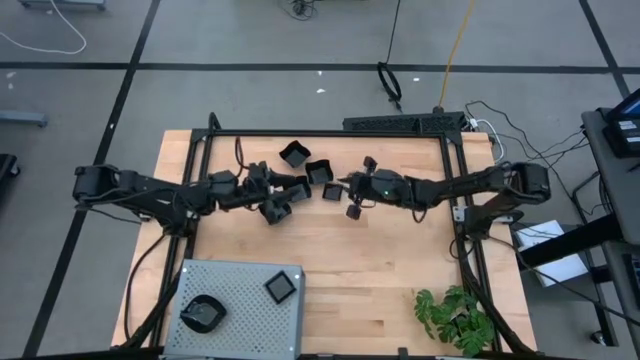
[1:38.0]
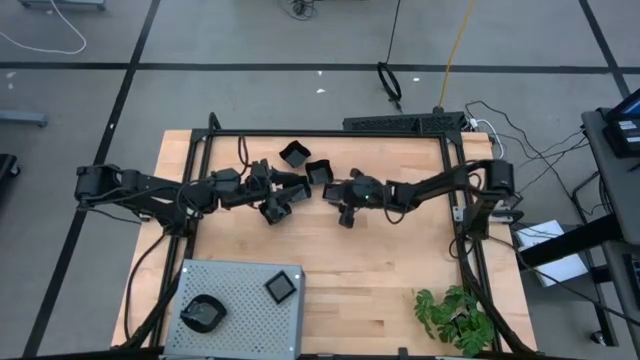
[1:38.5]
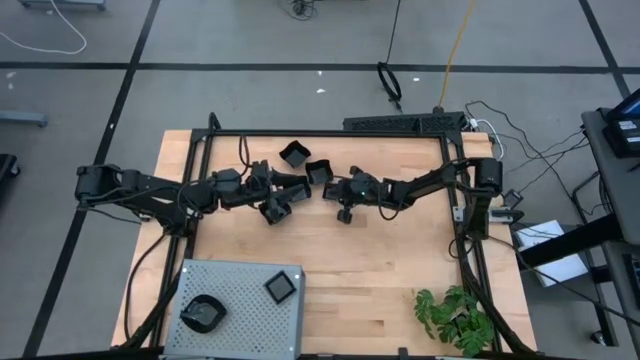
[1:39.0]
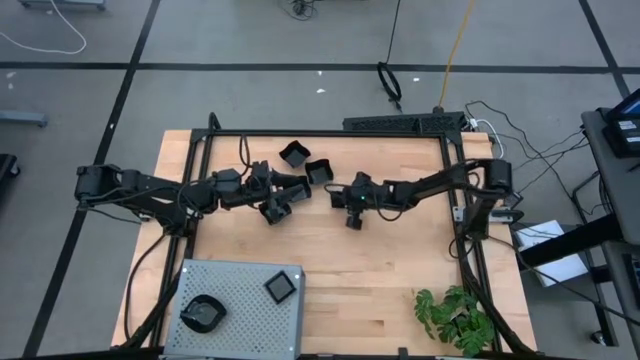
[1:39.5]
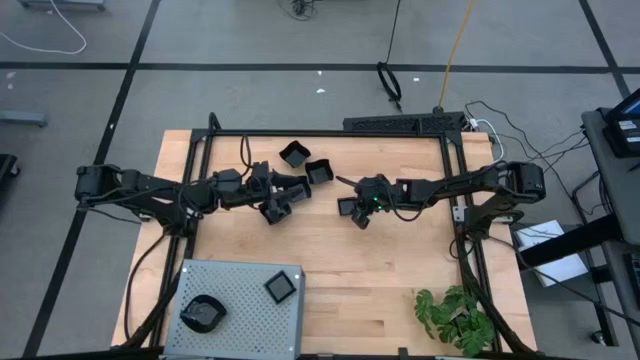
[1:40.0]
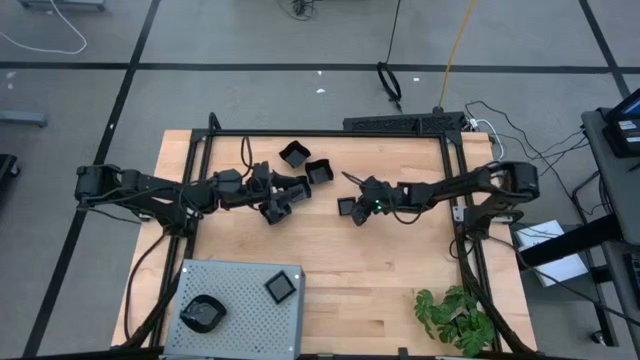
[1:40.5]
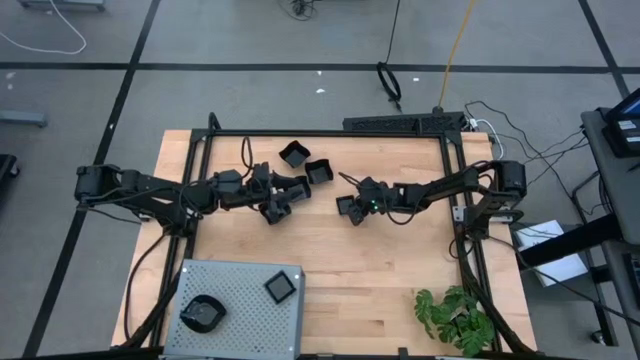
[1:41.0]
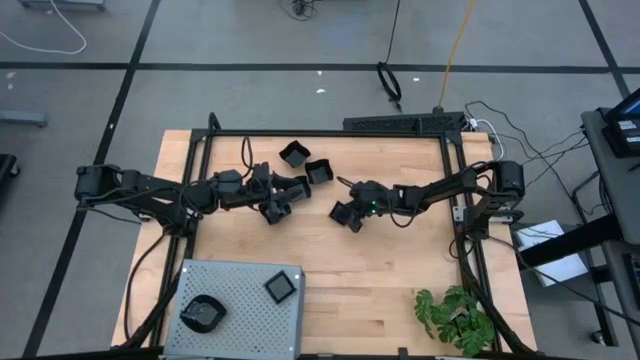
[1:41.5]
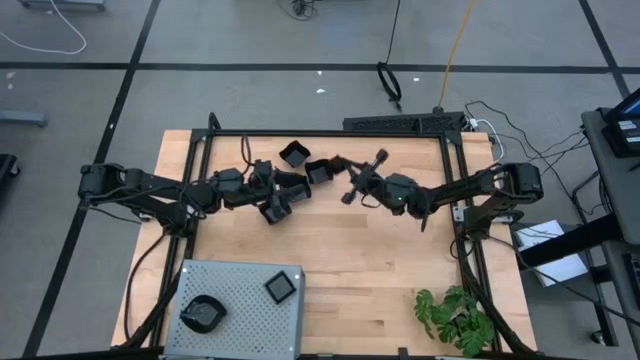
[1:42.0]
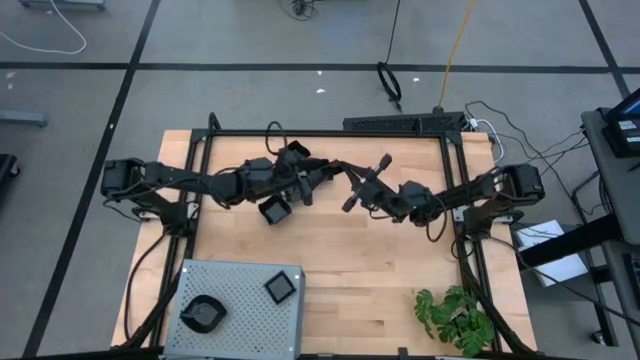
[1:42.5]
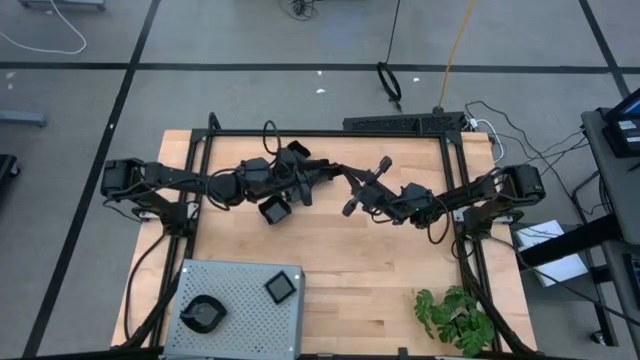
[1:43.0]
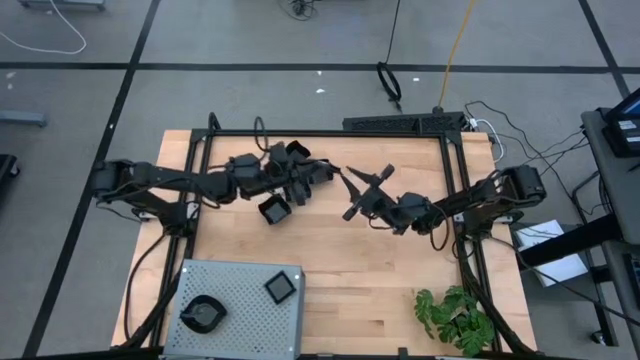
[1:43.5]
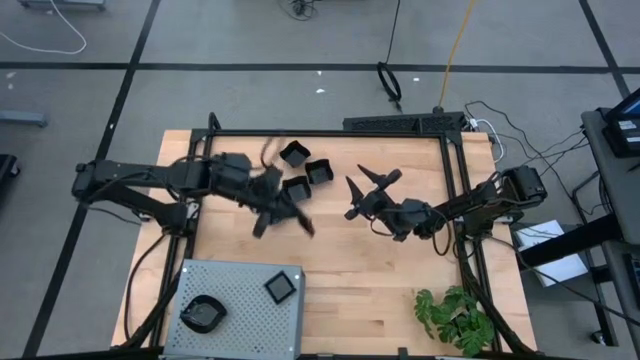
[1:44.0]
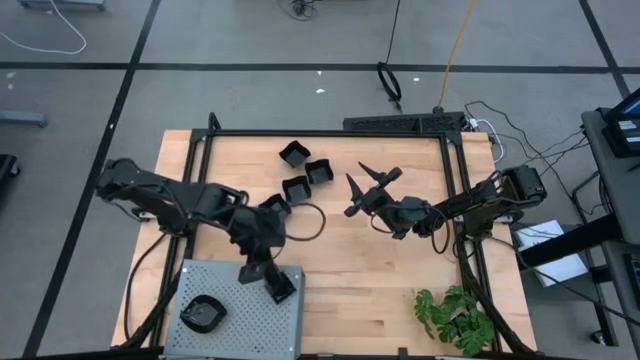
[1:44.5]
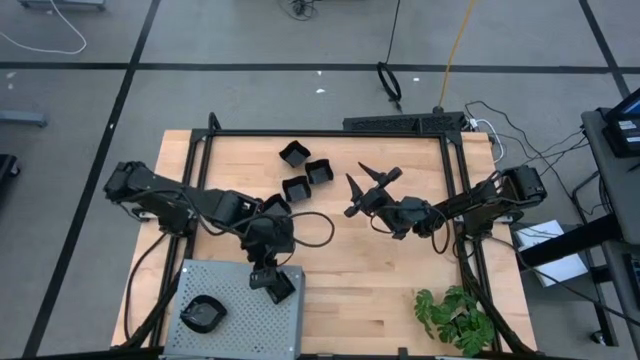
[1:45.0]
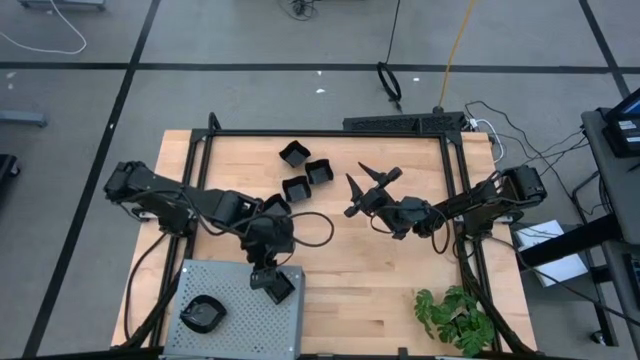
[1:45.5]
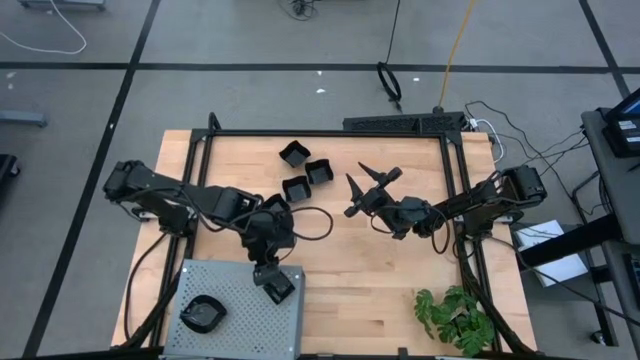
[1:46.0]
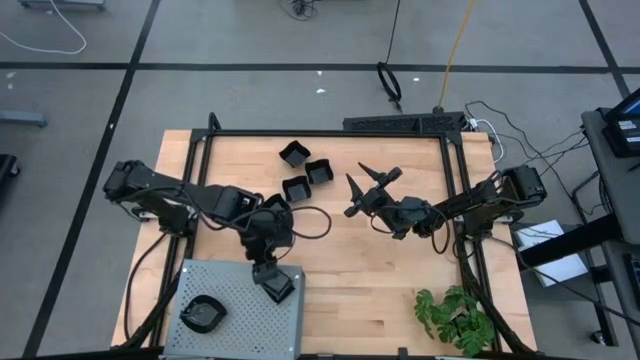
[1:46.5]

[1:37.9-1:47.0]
Task: Pick & Place Mini shaped plates
Stack the square plate on top of the other square plate on the shelf

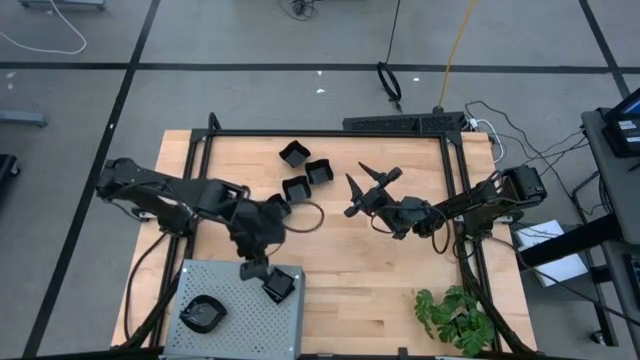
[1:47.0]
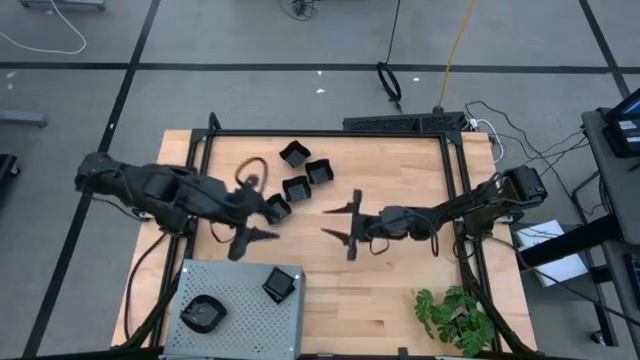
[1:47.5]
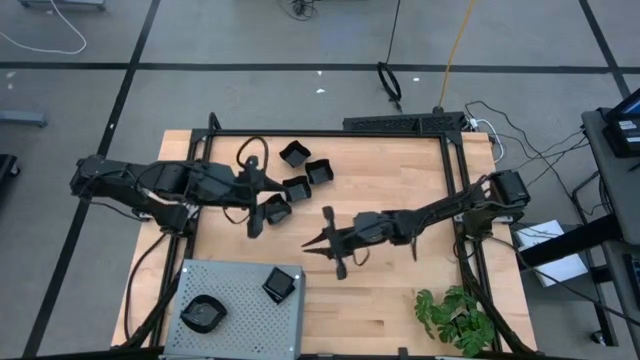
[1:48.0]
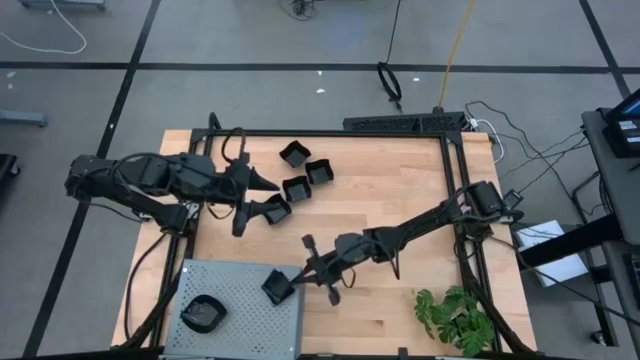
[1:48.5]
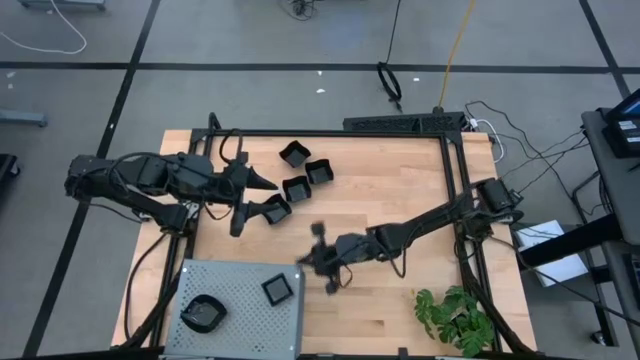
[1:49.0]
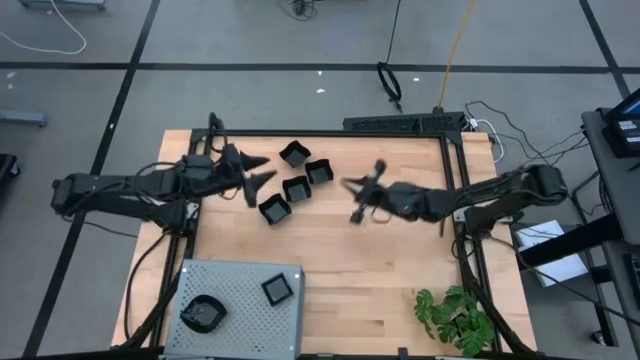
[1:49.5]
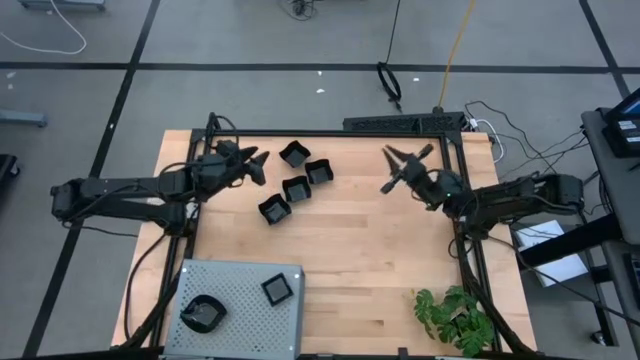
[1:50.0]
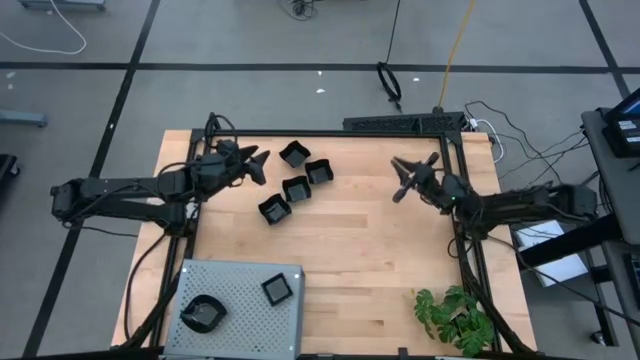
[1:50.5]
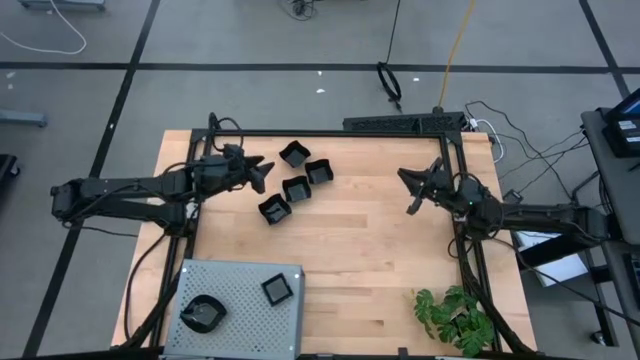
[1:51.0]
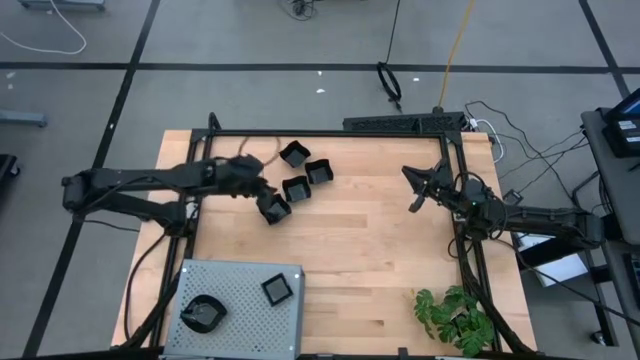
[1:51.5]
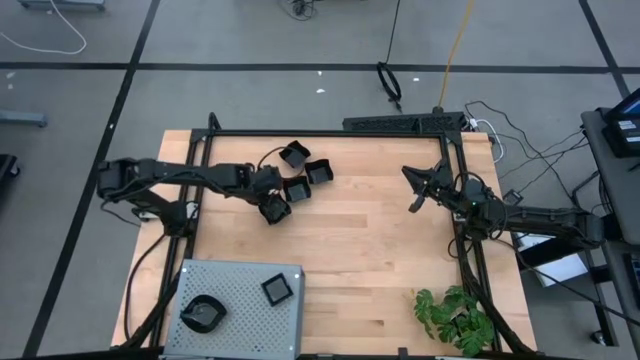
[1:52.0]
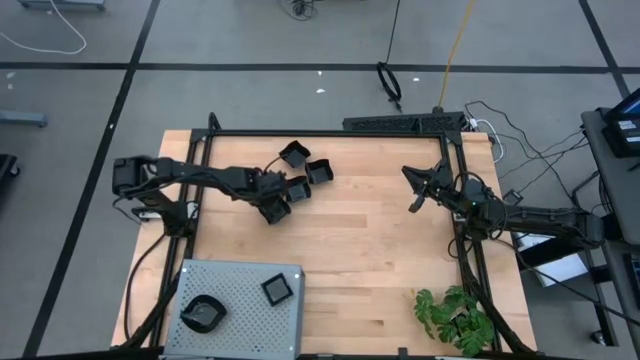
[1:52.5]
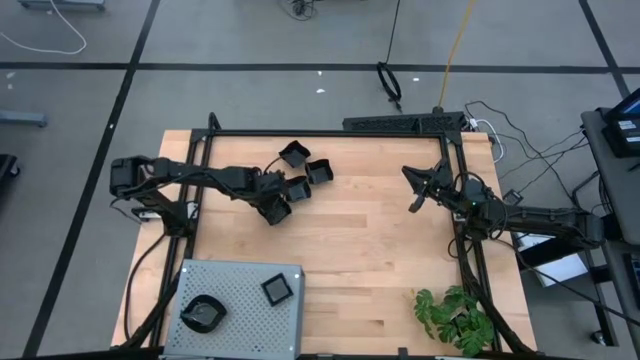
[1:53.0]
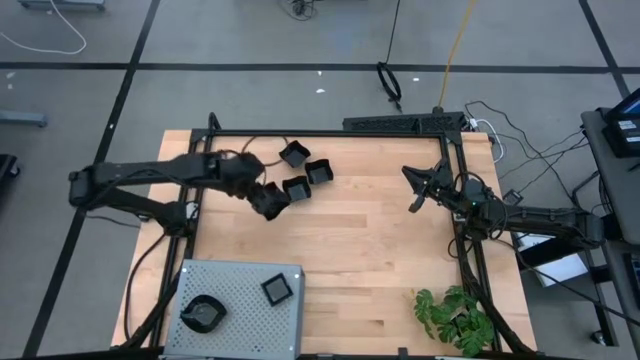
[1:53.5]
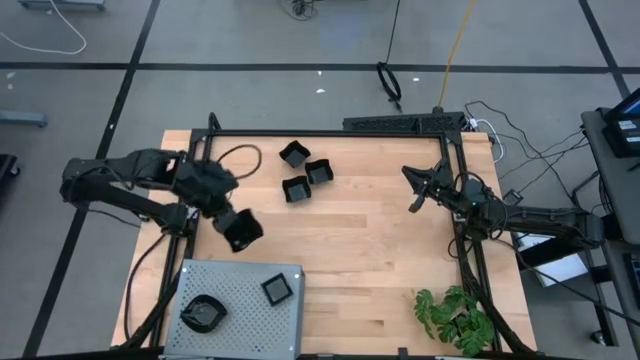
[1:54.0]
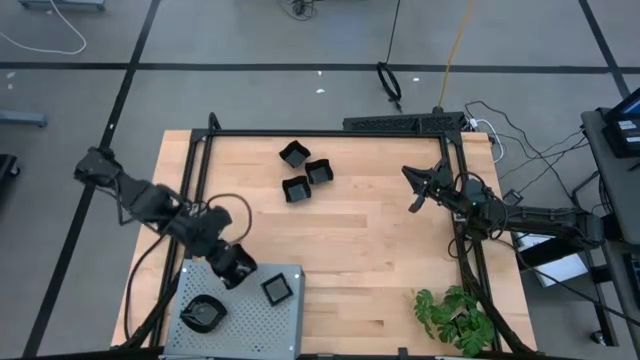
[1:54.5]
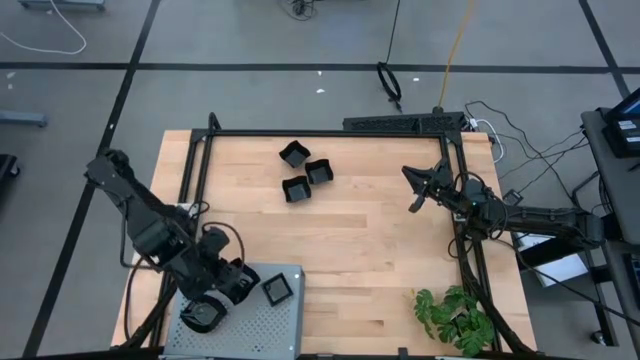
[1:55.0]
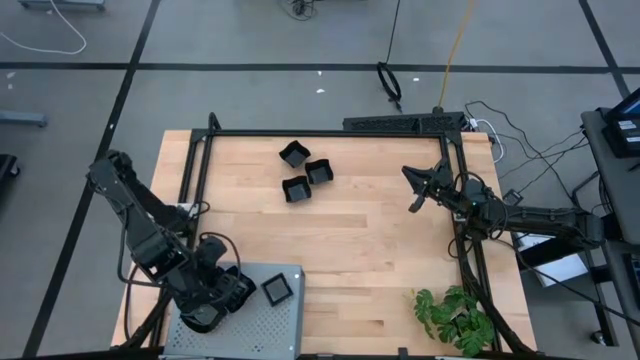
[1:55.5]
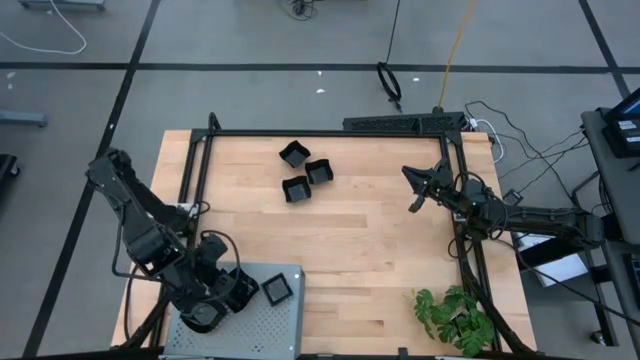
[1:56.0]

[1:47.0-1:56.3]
Put the distorted square plate on the shelf

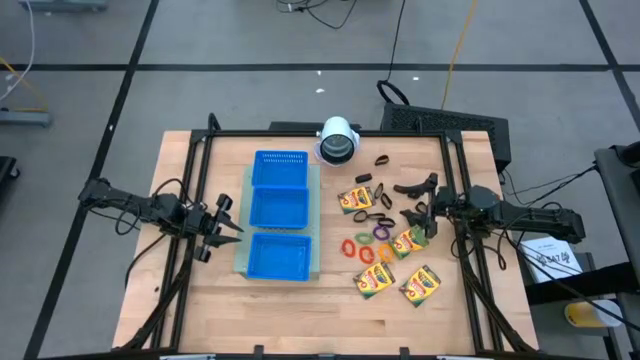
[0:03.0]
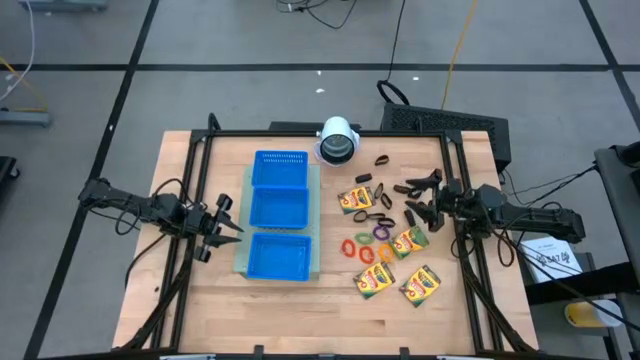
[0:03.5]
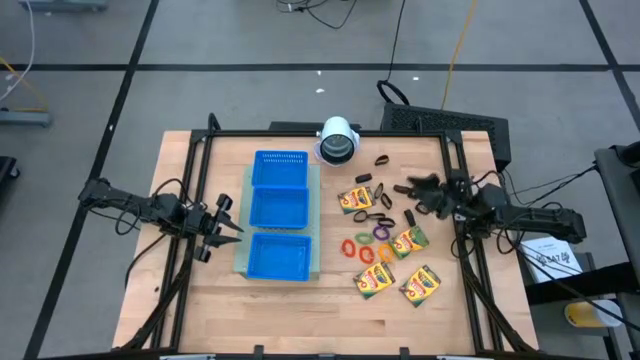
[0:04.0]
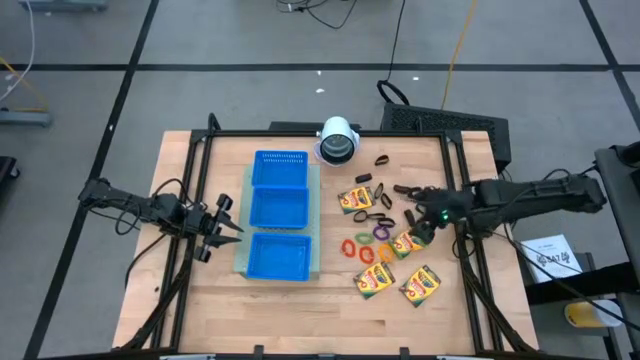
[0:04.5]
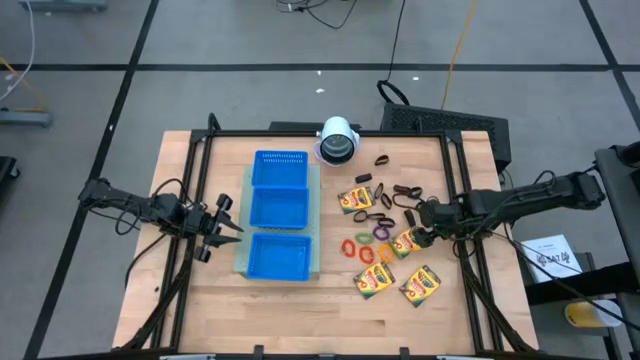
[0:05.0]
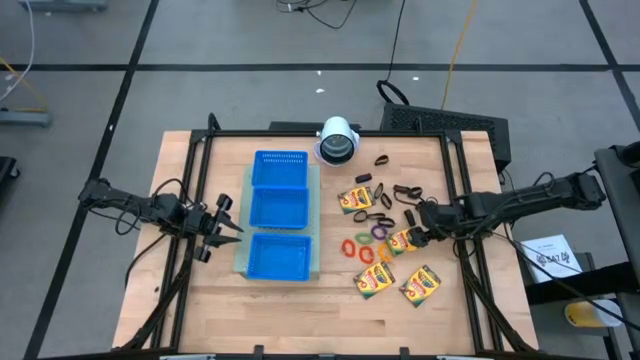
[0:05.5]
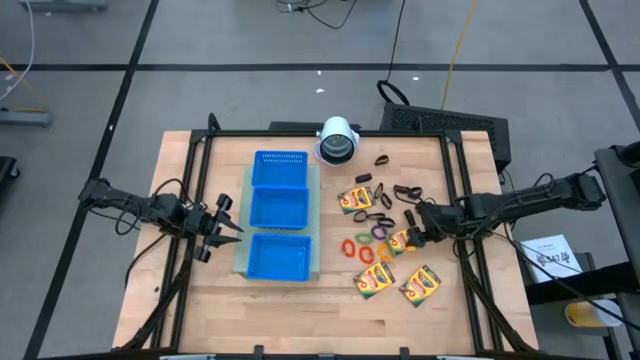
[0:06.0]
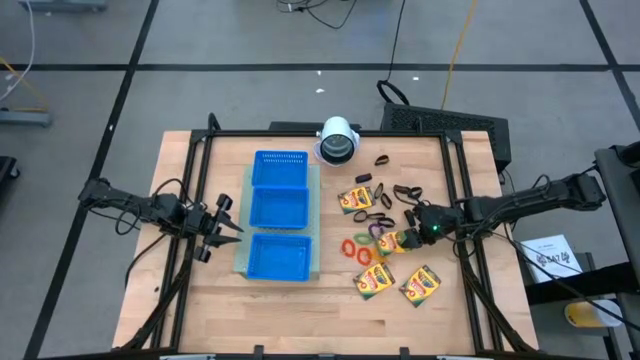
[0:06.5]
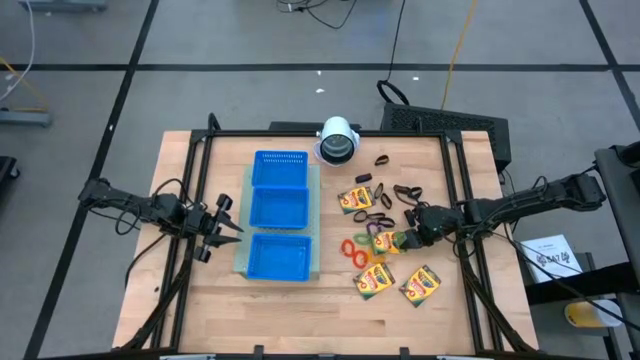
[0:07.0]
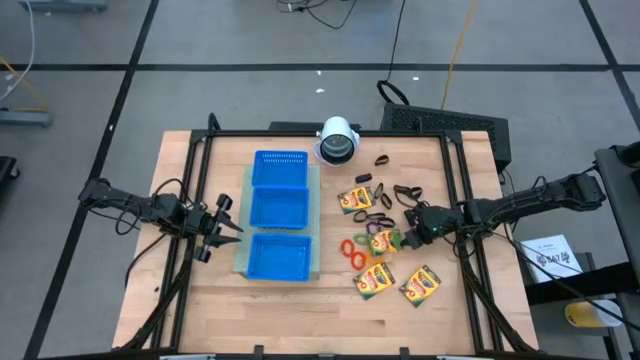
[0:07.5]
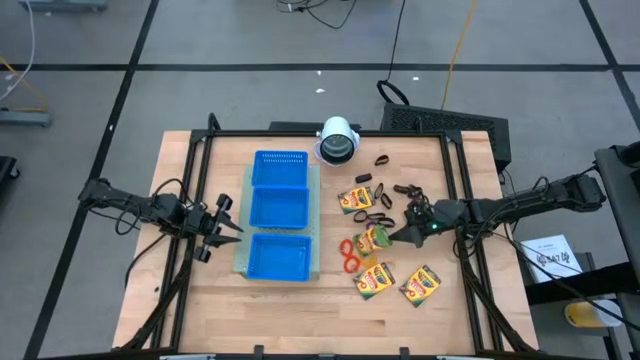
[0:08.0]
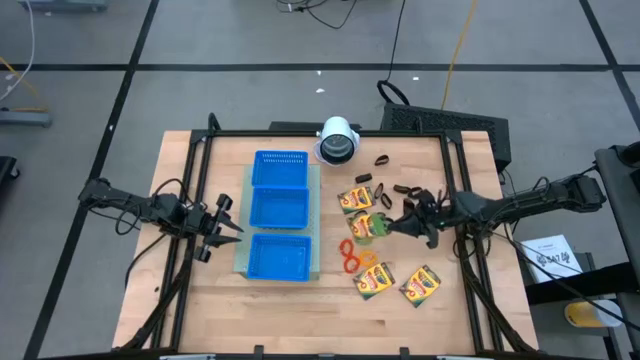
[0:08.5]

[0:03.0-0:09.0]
Task: Pick & Place Office Desk Supplies
Put the crayon box into the top blue bin on the shelf
